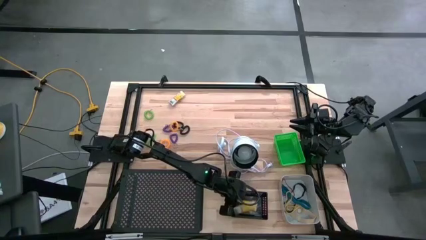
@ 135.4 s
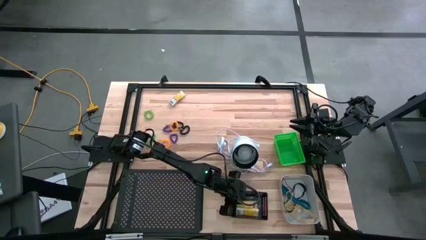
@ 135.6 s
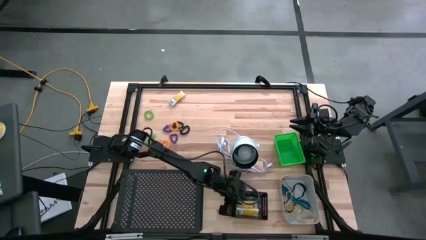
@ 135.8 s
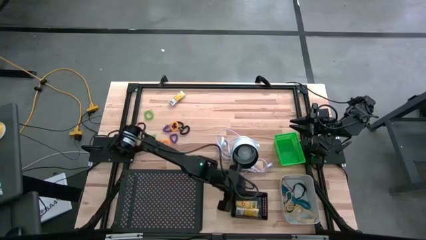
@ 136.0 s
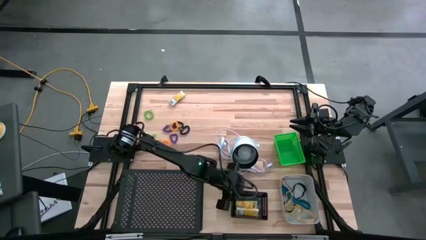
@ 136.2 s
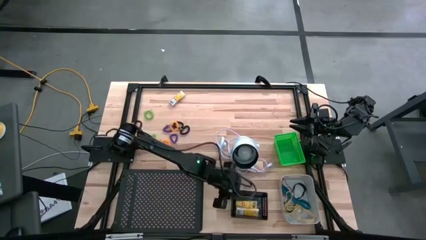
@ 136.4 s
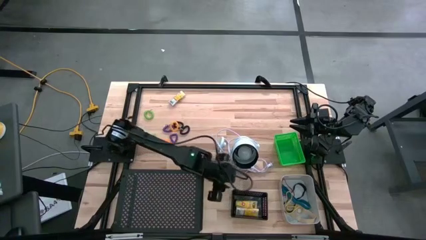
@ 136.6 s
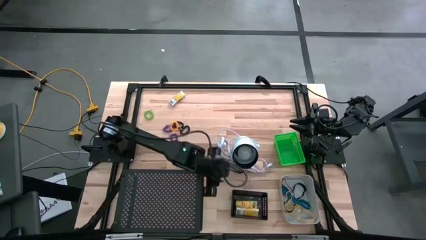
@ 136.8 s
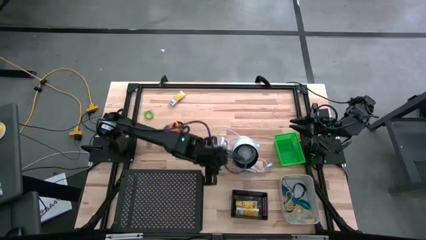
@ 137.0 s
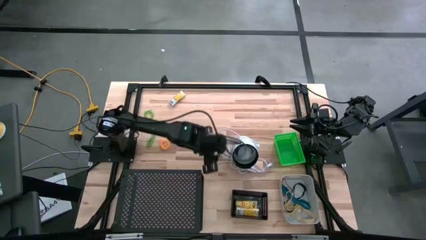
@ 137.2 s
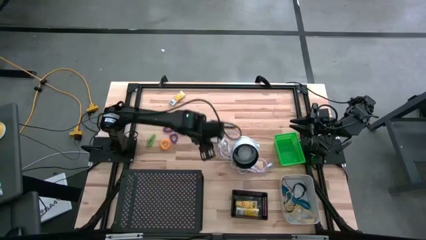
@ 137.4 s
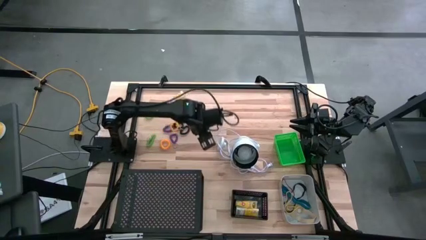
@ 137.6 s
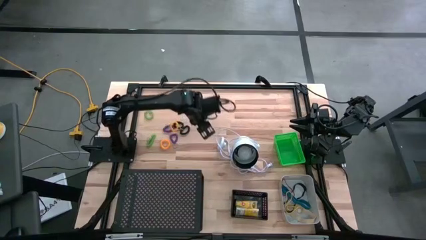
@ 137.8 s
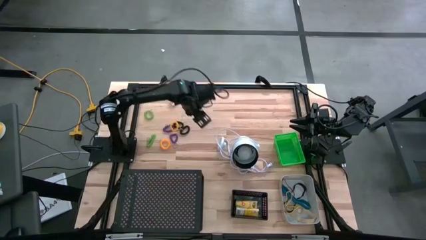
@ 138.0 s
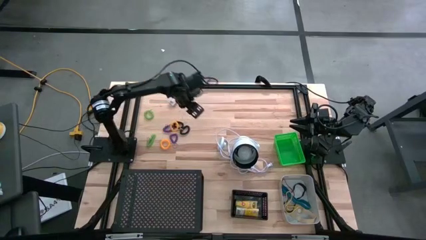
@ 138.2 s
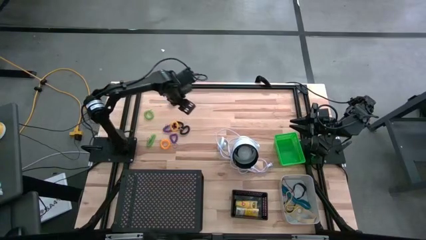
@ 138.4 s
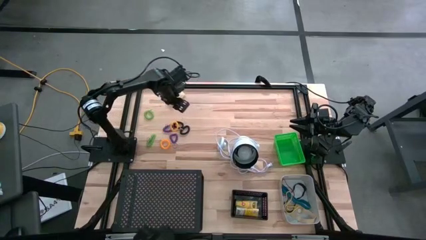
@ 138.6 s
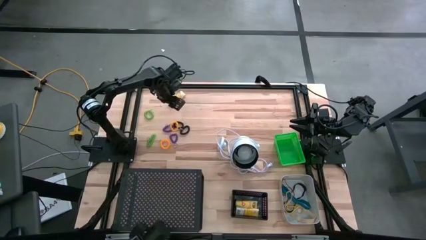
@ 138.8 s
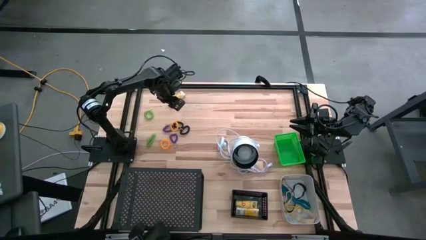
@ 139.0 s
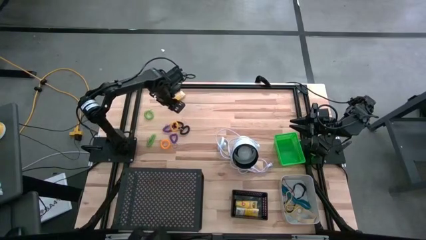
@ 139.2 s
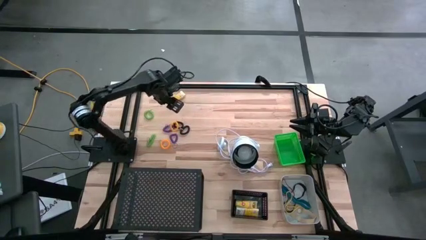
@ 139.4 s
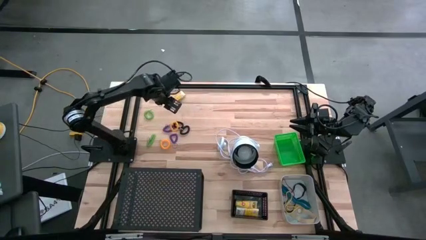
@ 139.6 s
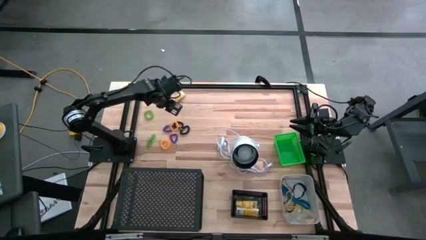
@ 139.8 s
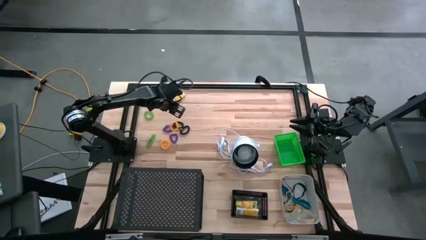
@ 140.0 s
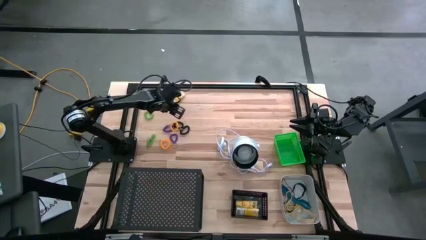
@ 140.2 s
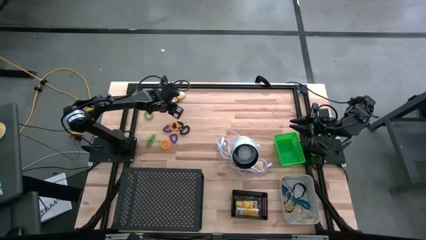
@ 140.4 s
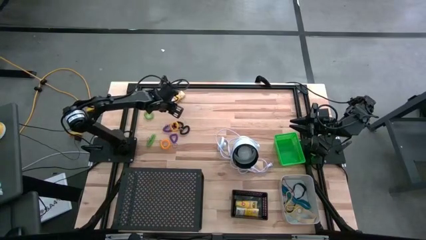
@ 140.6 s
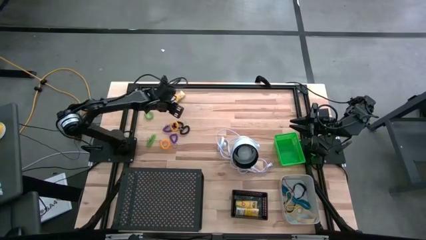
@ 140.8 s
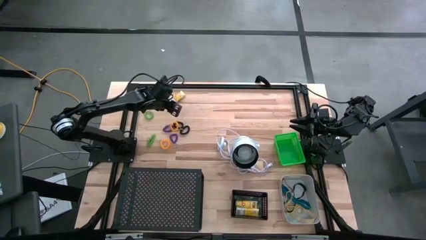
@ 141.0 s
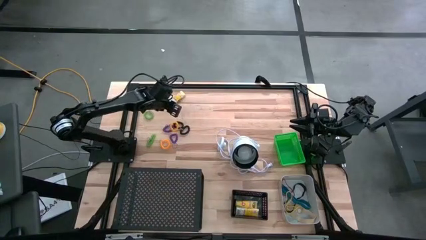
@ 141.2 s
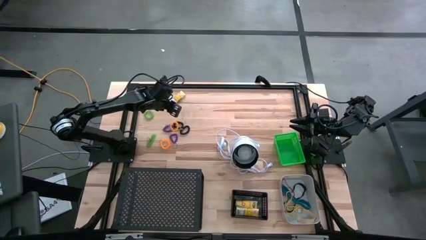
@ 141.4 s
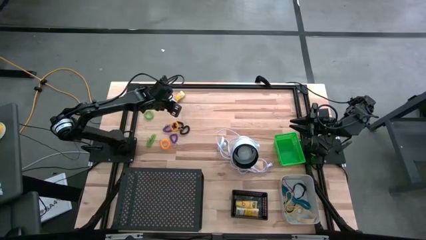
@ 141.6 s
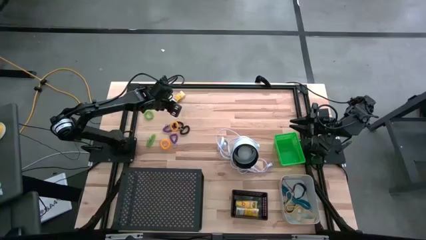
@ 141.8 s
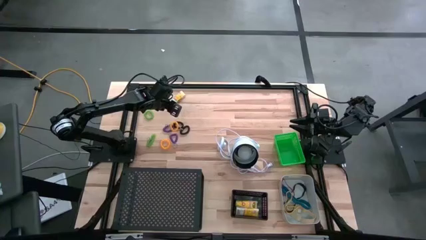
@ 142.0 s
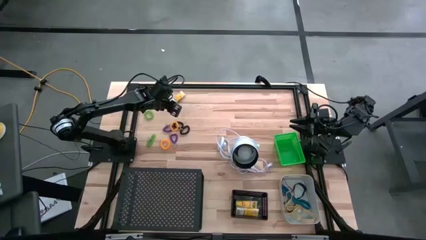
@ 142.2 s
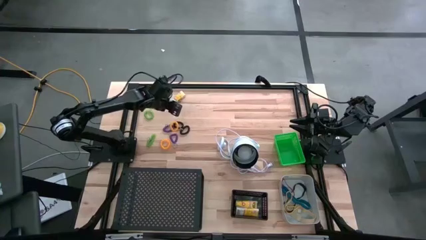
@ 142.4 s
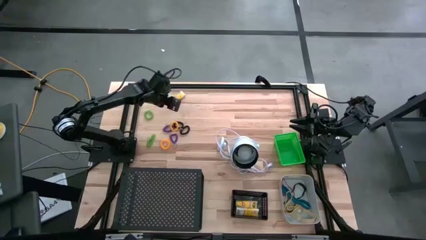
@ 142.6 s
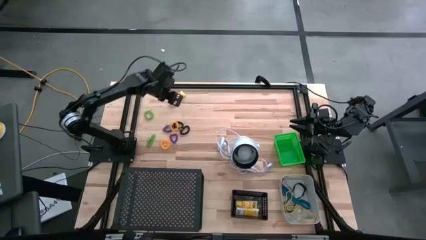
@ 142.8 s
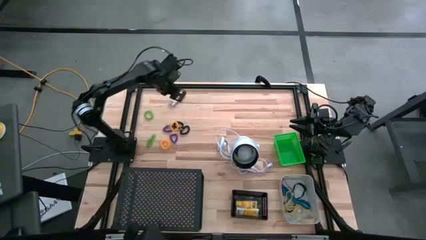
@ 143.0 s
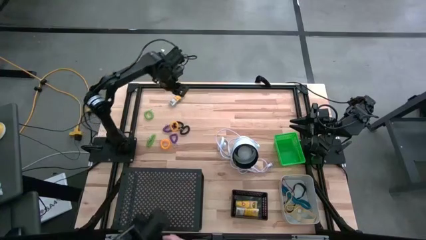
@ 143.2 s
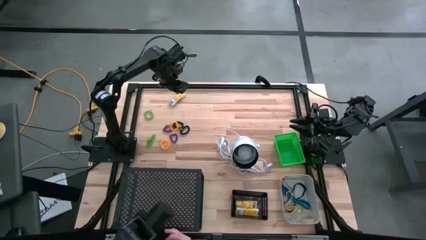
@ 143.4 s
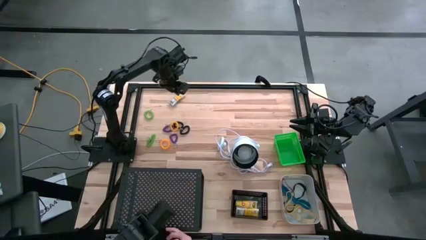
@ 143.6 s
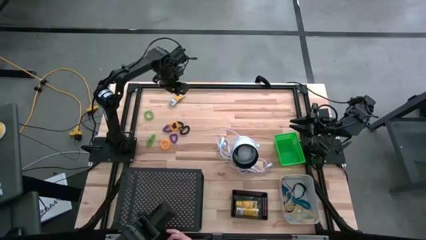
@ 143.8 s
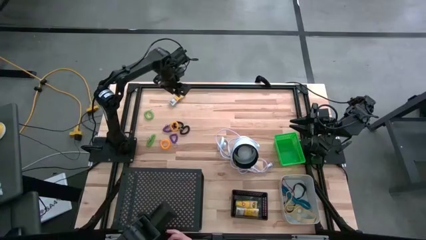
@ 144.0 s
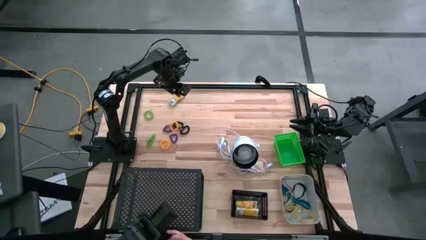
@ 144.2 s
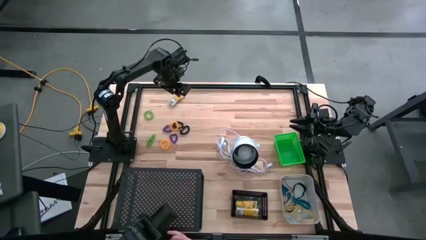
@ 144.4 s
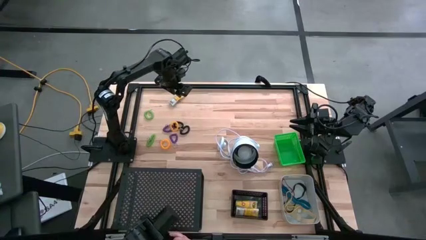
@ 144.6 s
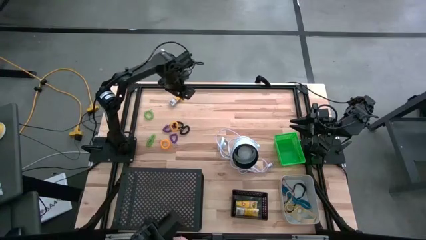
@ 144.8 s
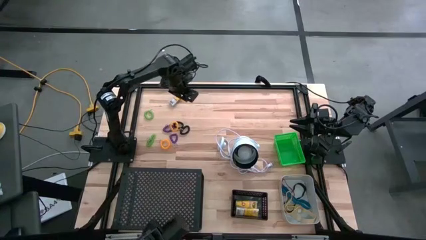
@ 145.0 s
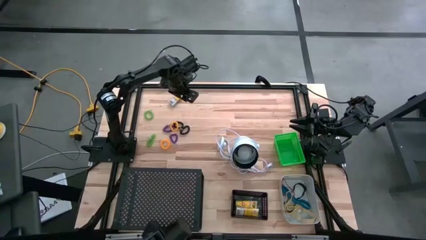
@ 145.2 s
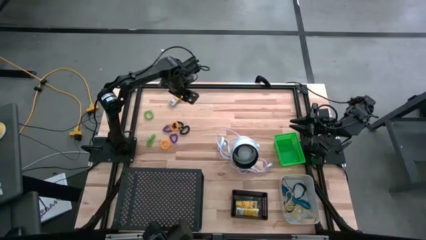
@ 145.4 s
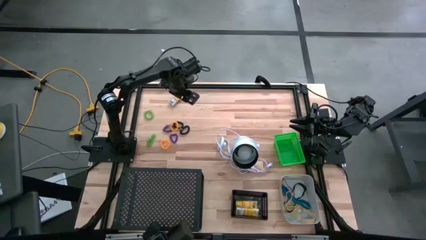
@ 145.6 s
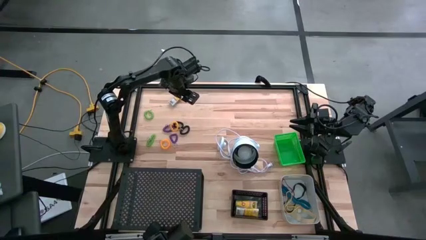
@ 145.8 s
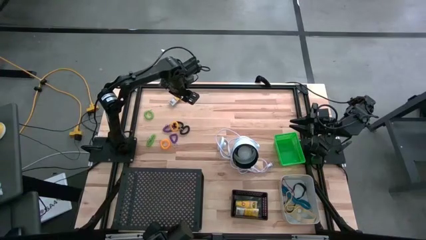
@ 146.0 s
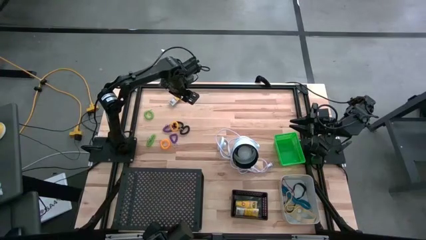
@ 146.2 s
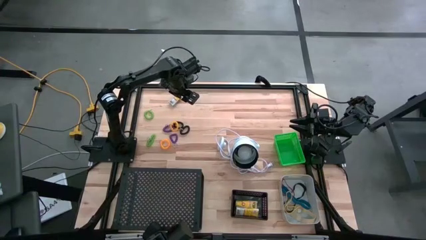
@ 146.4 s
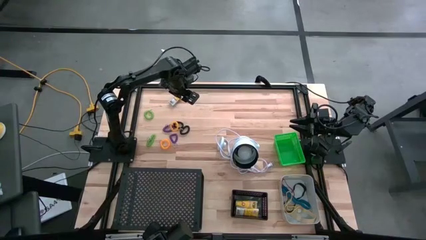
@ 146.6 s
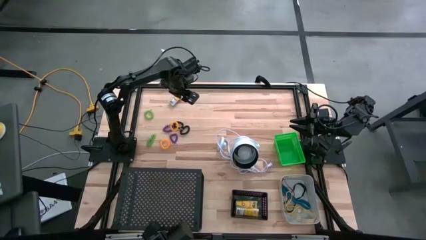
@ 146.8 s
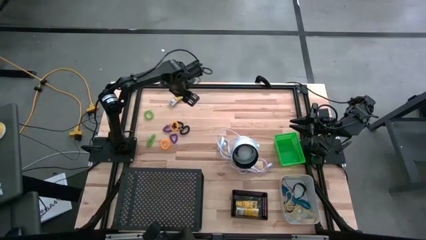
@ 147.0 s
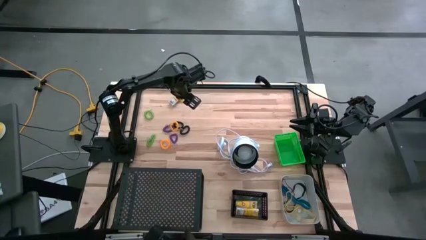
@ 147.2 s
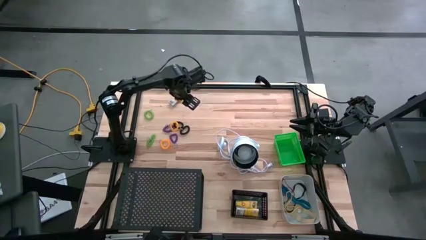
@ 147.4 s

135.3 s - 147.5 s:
Task: Pick & Place Office Desk Supplies
Put the yellow crayon box into the black bin

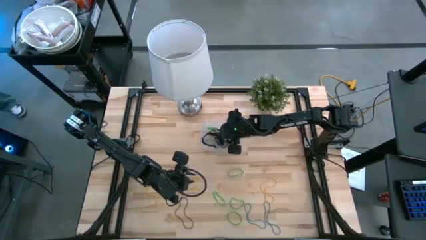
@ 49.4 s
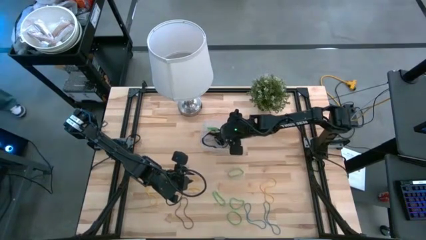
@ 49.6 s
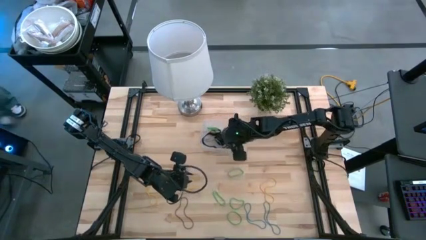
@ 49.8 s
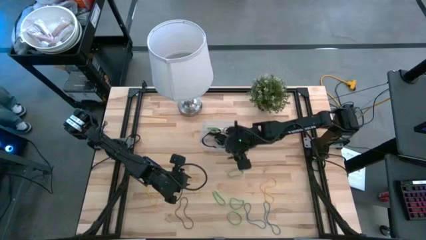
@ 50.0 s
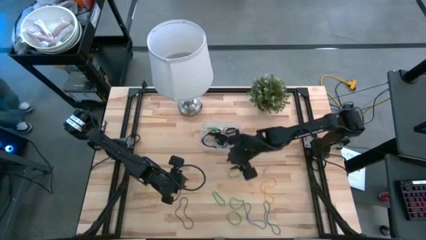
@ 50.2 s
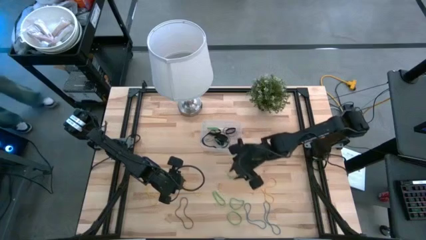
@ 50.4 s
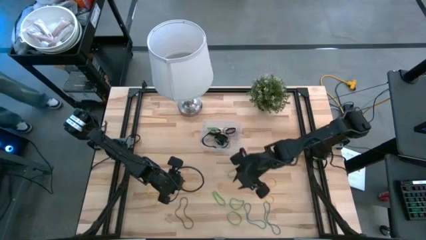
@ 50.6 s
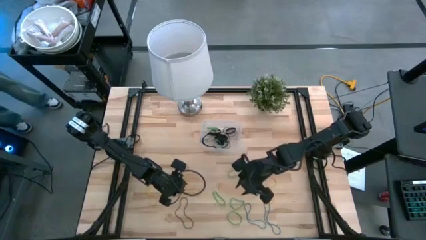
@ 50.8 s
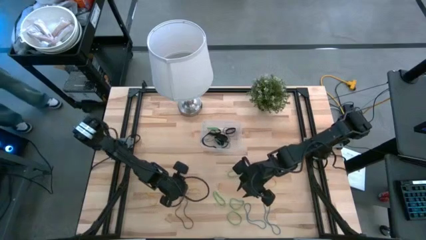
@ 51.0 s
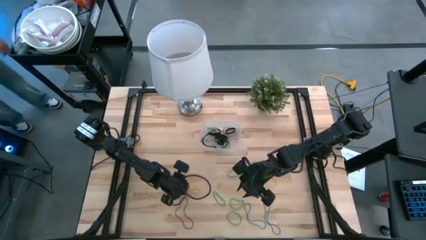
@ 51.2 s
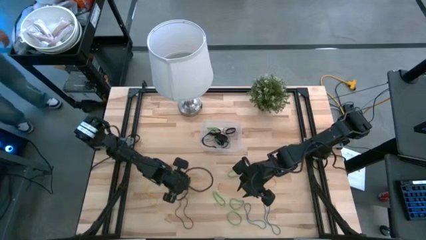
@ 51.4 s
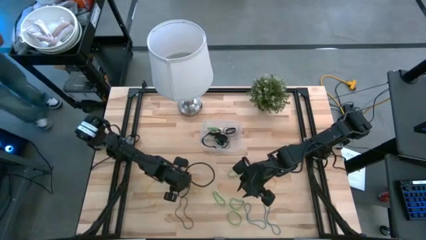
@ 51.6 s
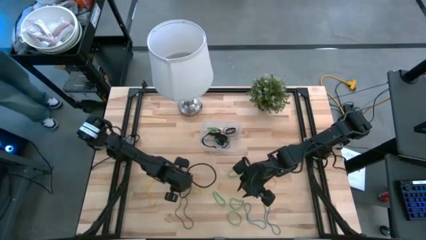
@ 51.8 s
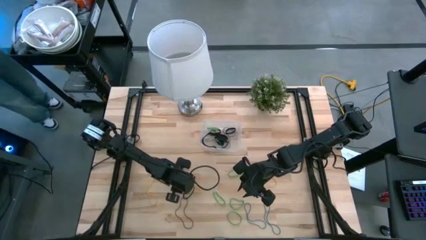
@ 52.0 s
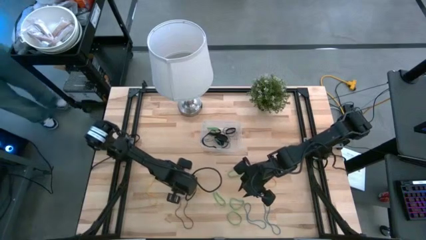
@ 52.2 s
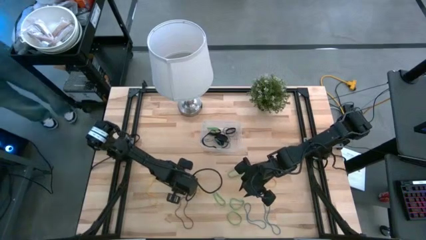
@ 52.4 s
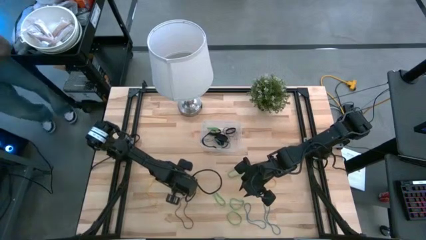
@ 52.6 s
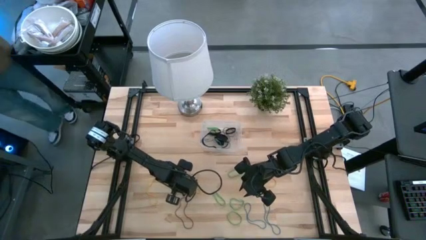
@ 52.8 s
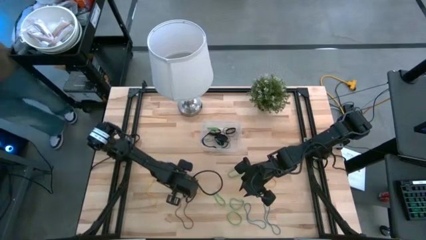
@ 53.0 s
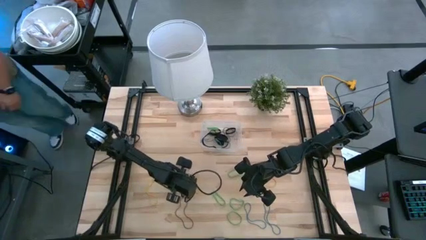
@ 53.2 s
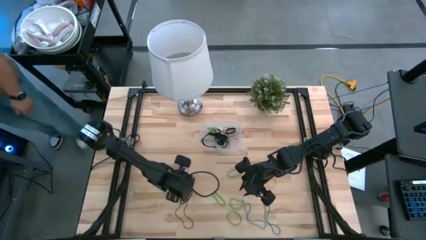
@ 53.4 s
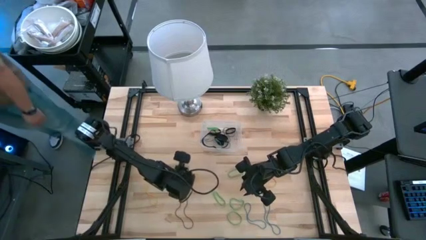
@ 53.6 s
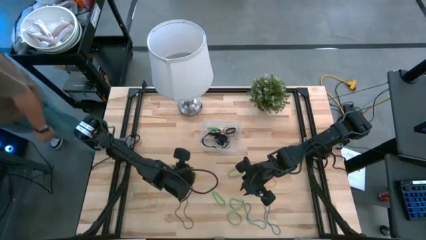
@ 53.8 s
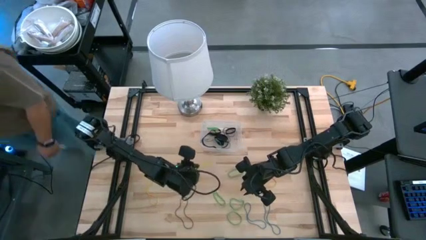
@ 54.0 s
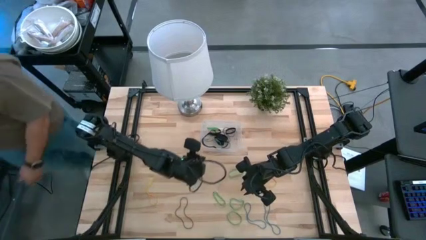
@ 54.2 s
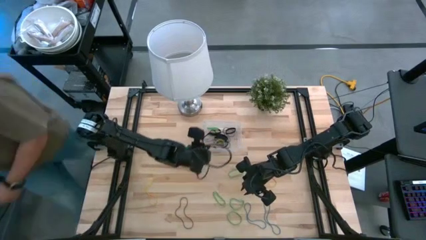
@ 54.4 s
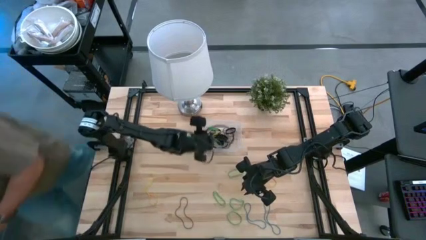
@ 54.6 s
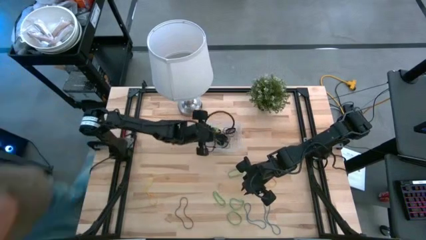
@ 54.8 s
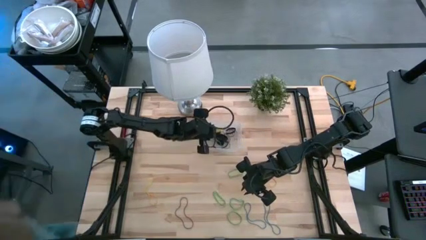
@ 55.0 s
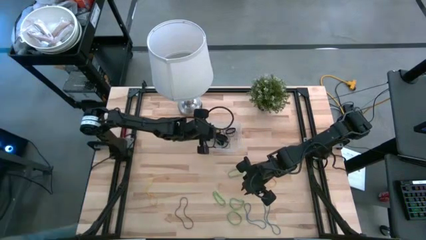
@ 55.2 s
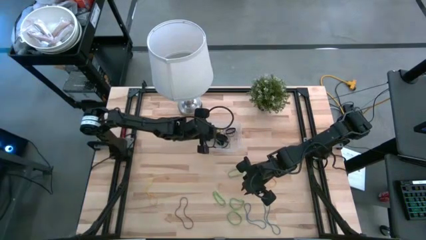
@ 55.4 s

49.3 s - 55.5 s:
Task: Pick and place rubber bands into bin
Put the yellow rubber band into the transparent bin
